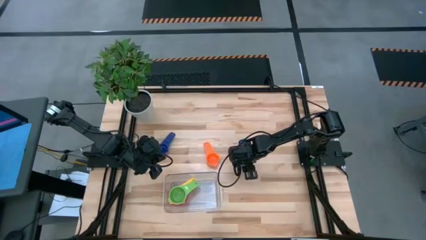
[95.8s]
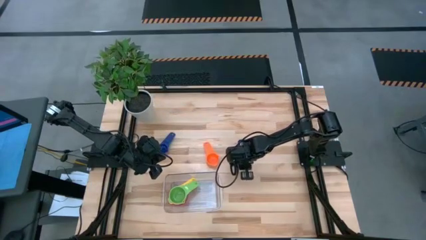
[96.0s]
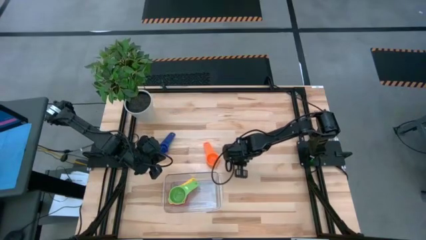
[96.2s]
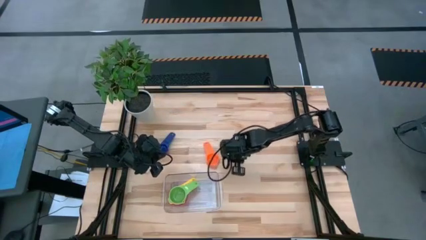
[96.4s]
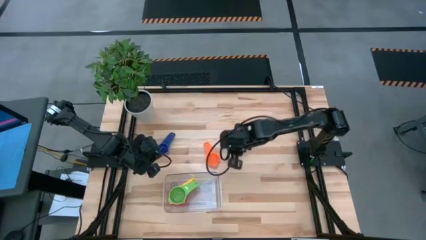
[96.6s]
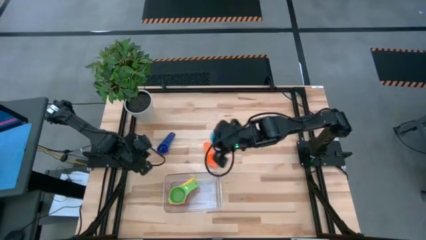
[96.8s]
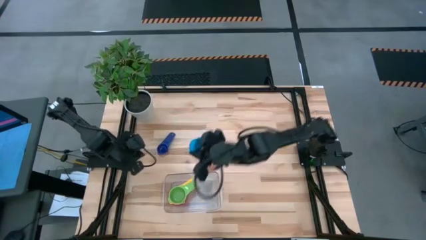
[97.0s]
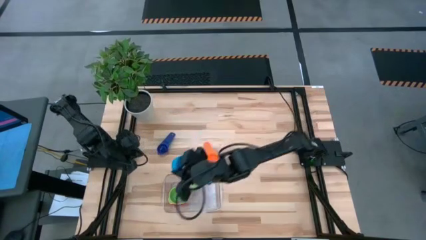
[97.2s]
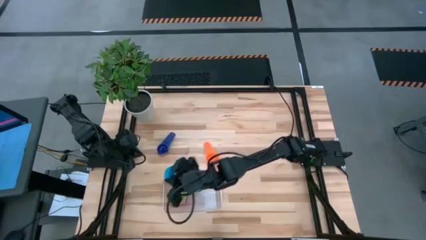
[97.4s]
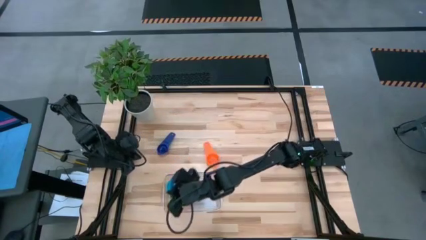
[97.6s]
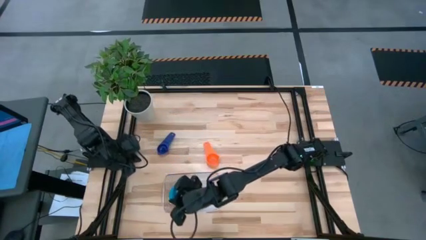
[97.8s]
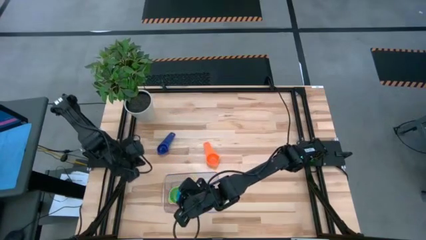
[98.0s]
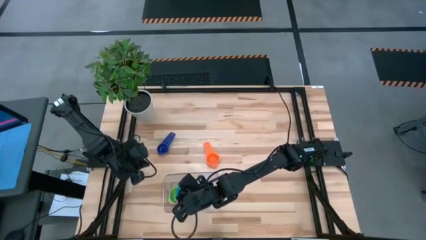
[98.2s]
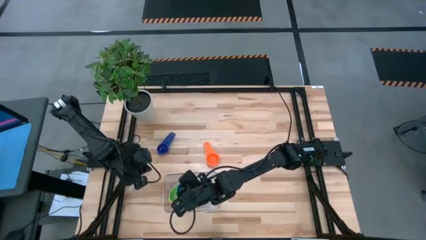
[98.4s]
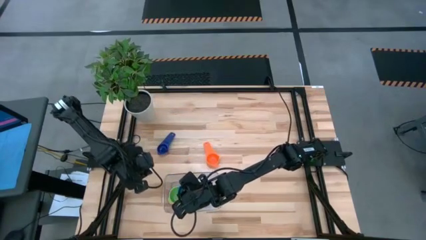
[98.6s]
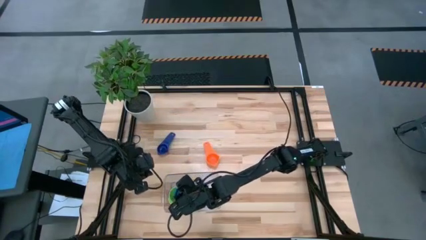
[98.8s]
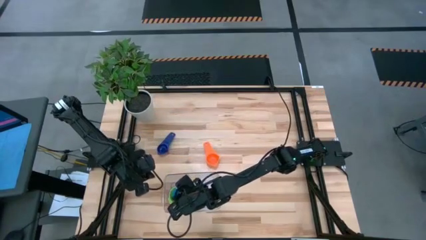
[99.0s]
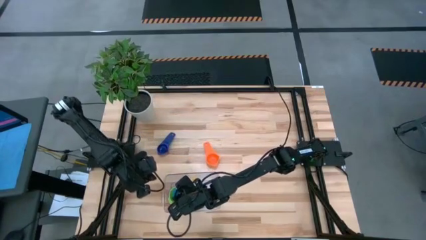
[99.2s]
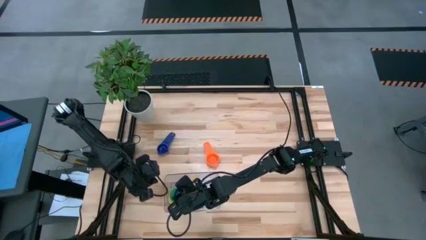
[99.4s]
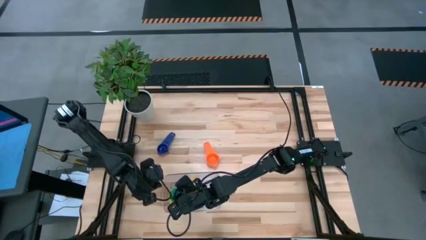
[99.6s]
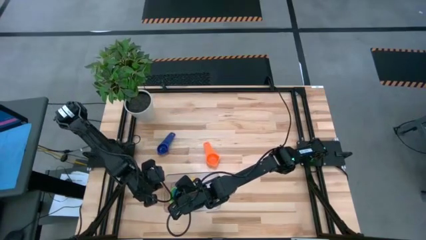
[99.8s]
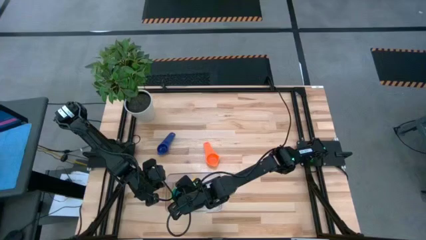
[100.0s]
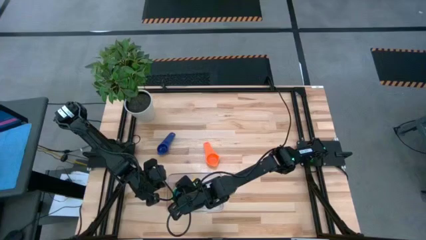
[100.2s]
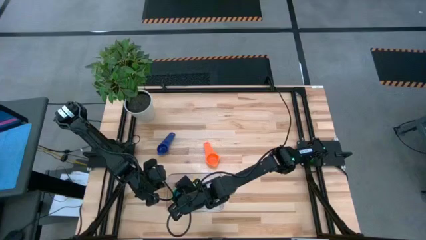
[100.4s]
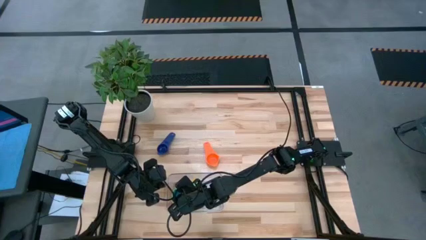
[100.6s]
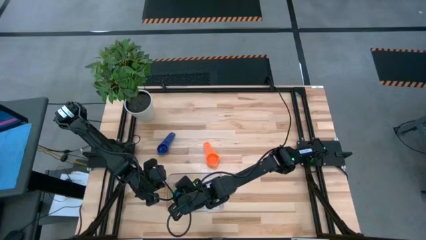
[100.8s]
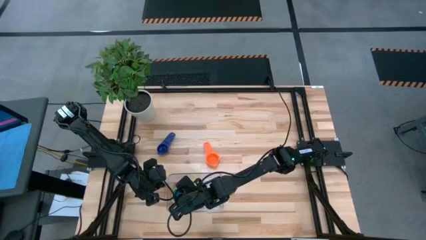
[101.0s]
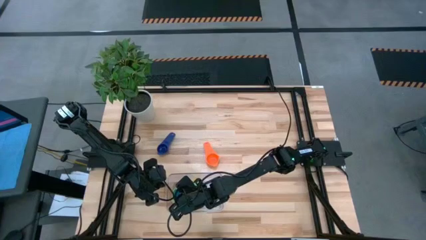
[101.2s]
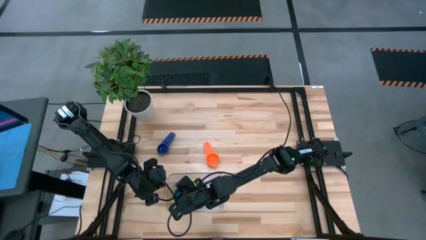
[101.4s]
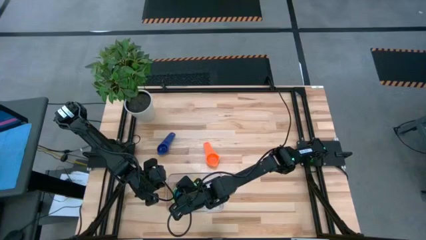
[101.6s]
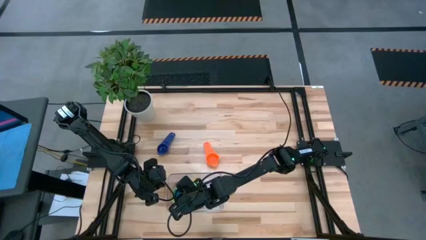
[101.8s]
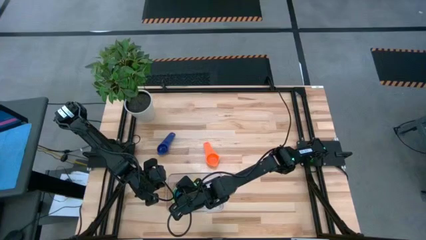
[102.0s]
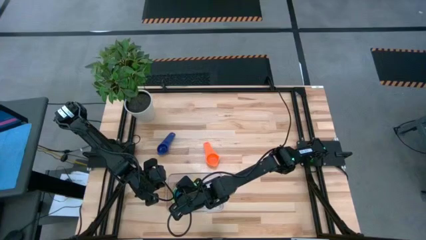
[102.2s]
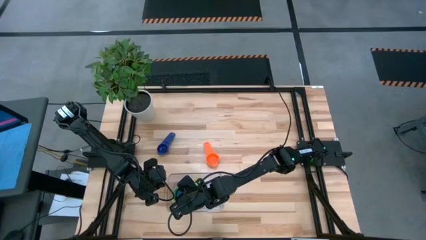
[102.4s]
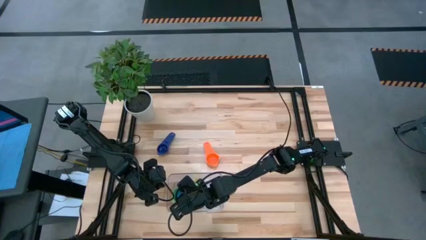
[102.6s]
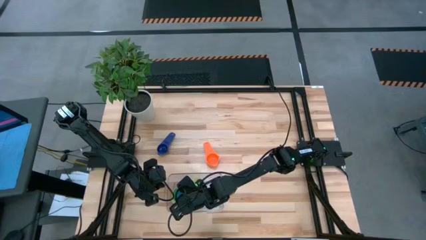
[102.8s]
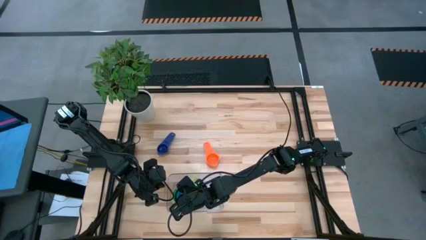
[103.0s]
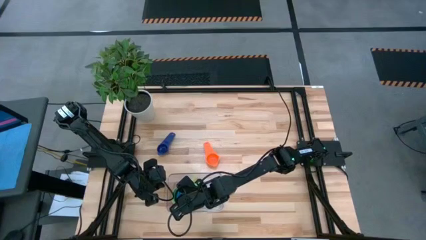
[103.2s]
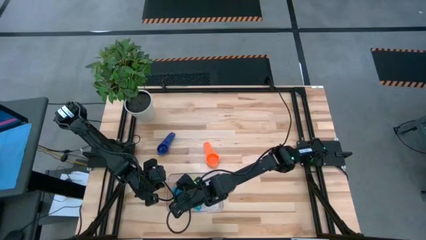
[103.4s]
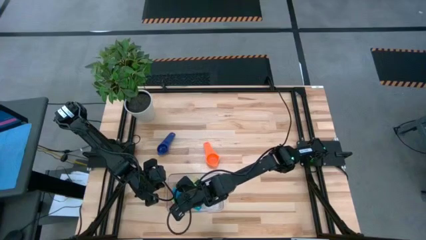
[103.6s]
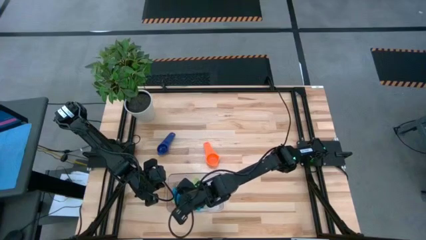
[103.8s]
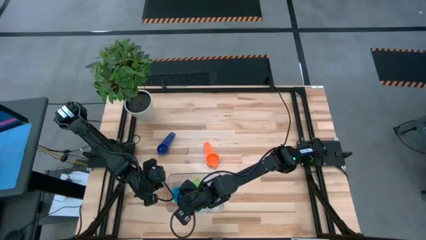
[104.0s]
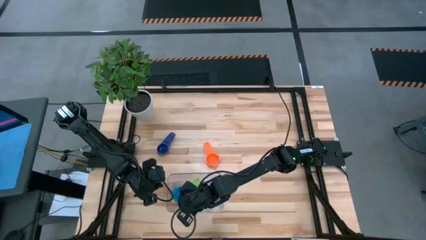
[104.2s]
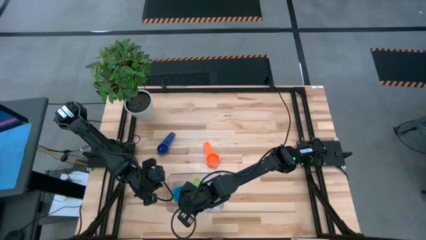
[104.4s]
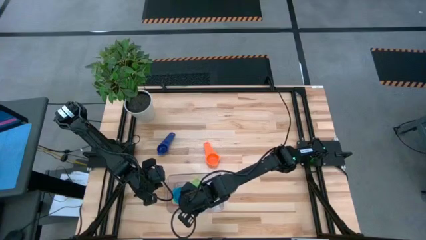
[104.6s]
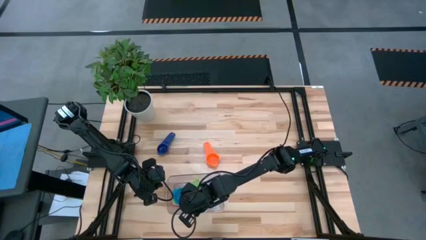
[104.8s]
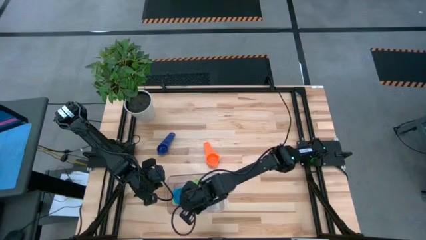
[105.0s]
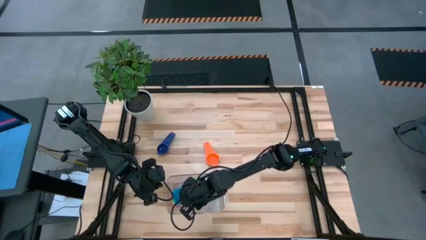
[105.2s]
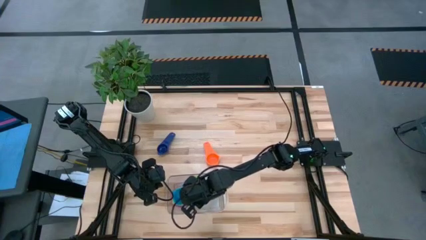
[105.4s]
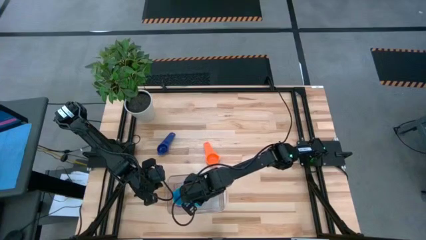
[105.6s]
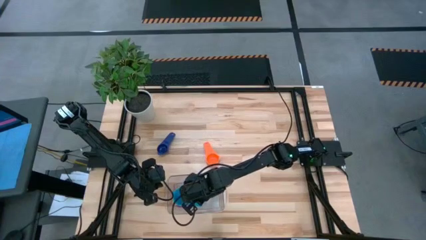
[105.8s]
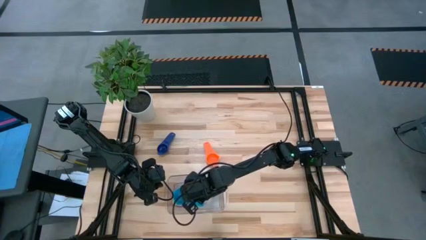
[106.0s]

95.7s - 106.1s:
Task: Nest measuring cups in basket
Stack the light blue measuring cup on top of the green measuring cup into the transparent bin

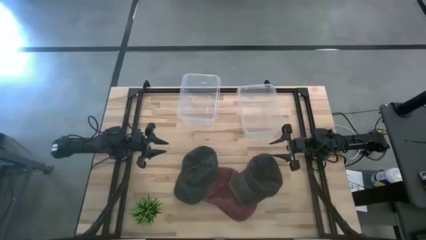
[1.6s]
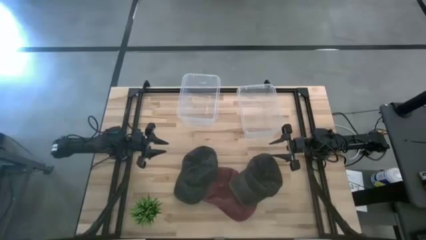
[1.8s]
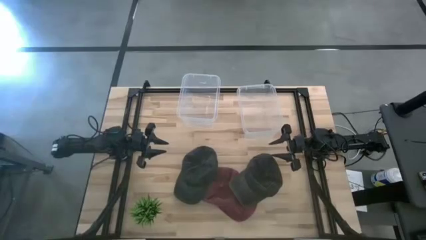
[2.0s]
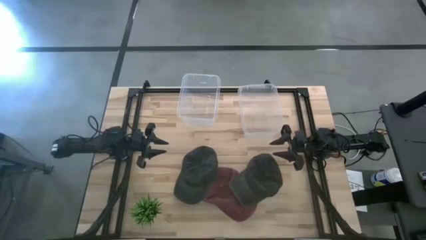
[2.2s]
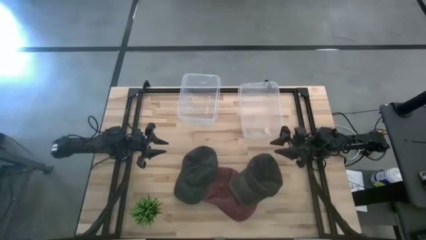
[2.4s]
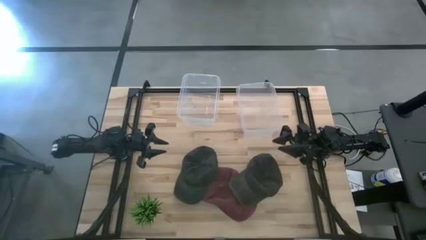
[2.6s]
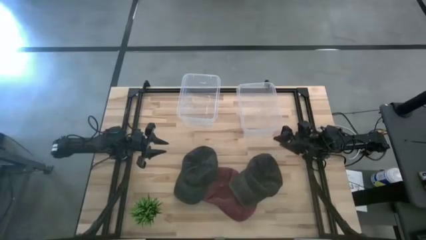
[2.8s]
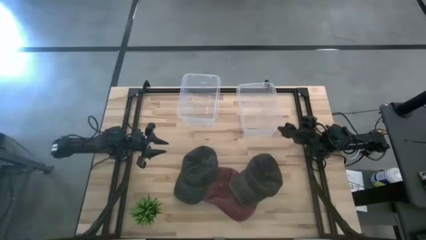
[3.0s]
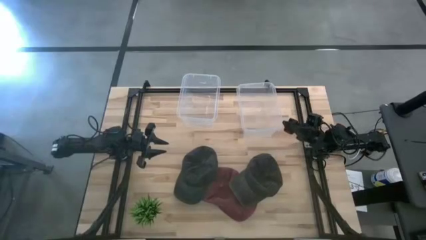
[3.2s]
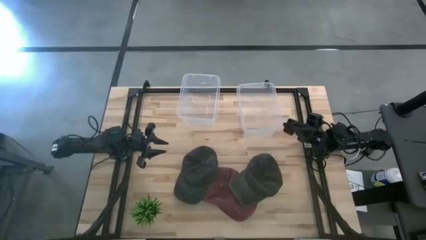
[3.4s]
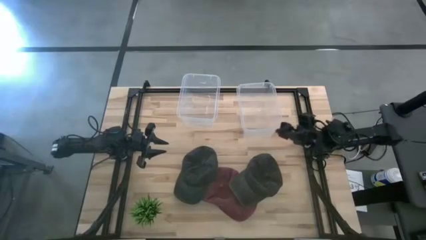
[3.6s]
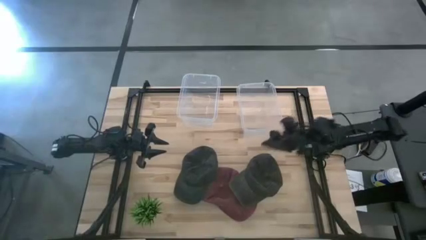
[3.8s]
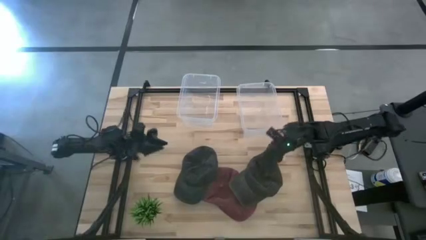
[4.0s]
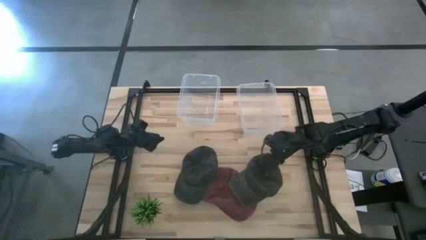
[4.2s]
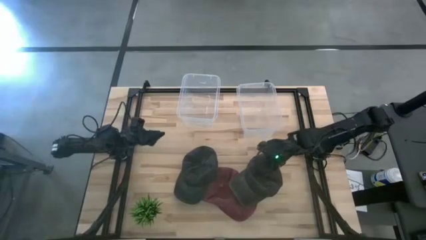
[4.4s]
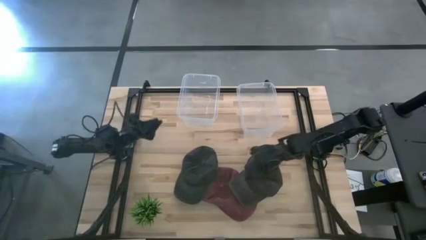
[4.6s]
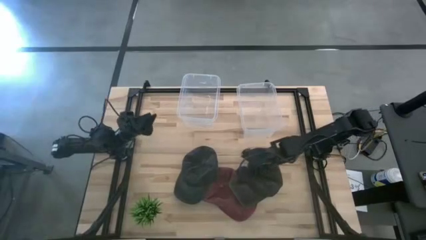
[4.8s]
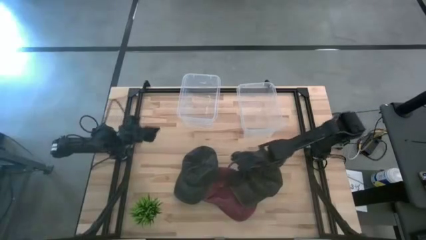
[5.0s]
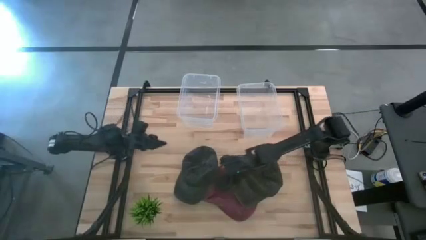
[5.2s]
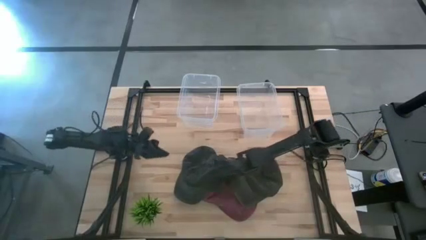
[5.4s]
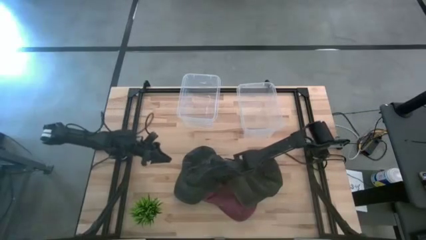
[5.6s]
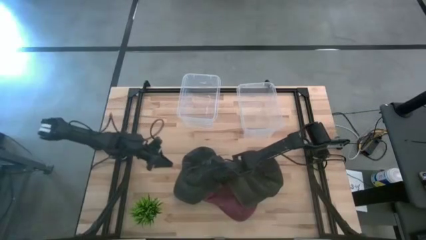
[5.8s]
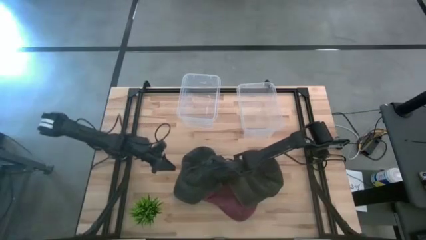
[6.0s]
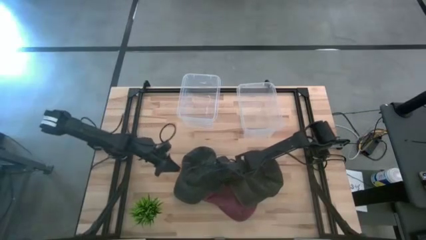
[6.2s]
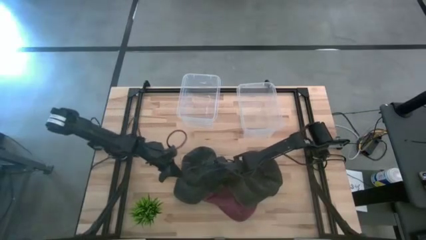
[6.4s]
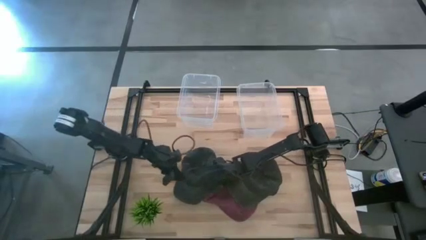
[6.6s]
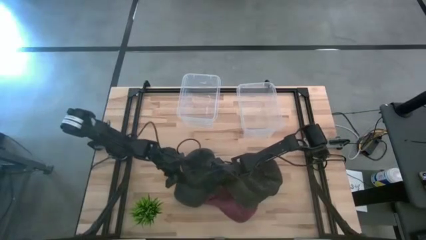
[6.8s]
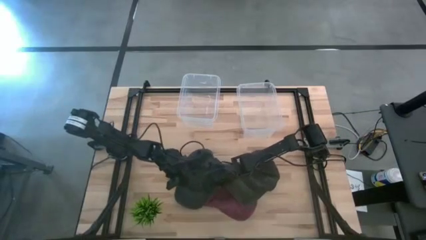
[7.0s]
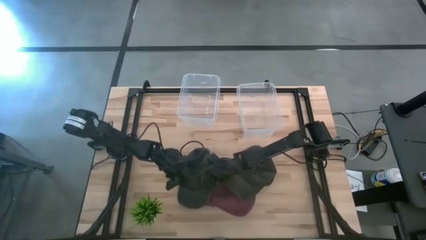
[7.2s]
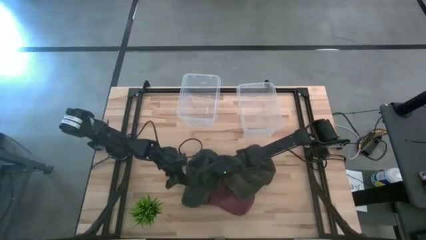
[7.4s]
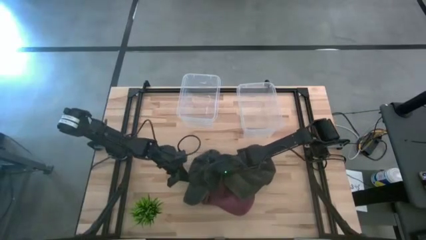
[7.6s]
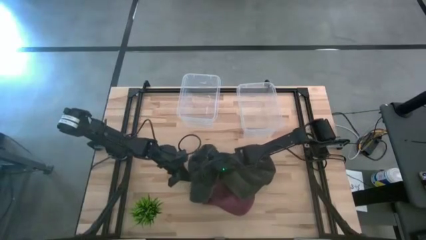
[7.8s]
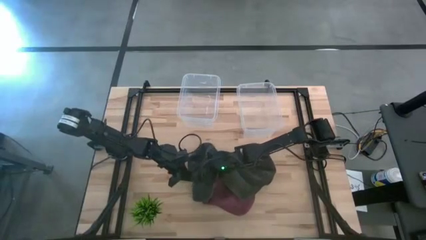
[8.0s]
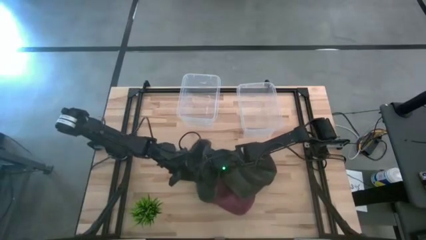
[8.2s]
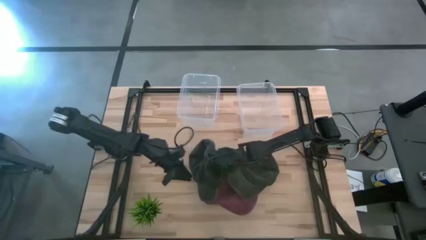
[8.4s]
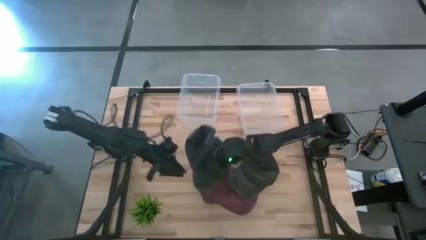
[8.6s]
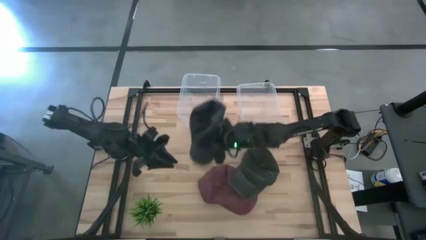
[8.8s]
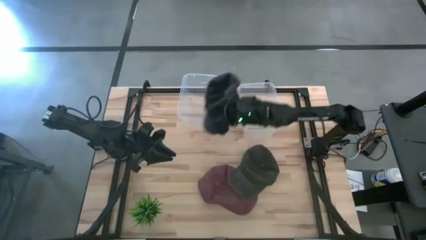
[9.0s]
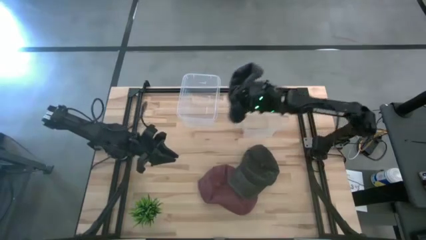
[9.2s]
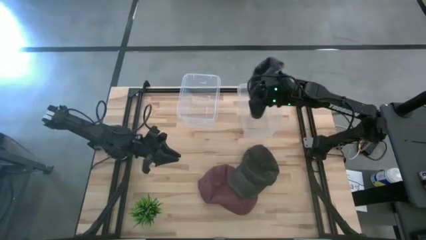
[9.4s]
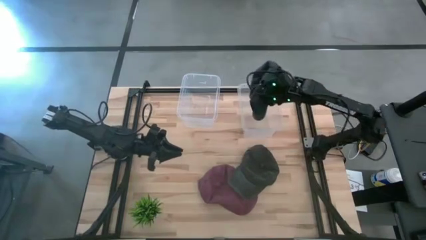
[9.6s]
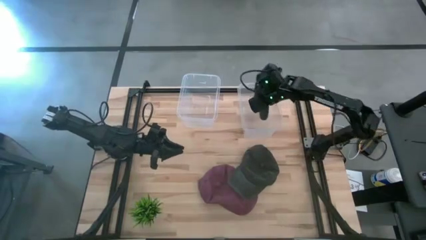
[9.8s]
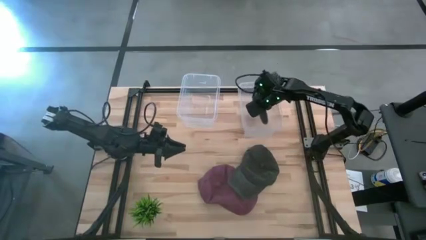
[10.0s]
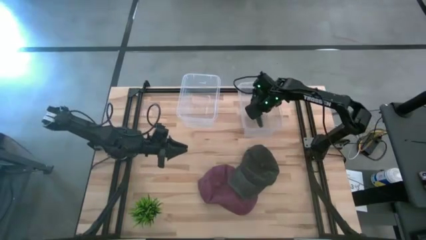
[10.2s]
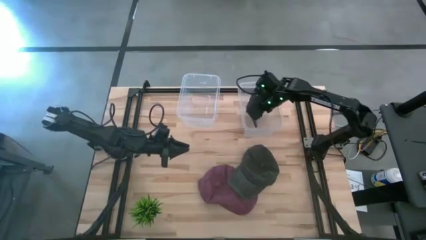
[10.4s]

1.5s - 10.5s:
Task: Pick & Place hat
Put the left black cap into the right transparent bin
